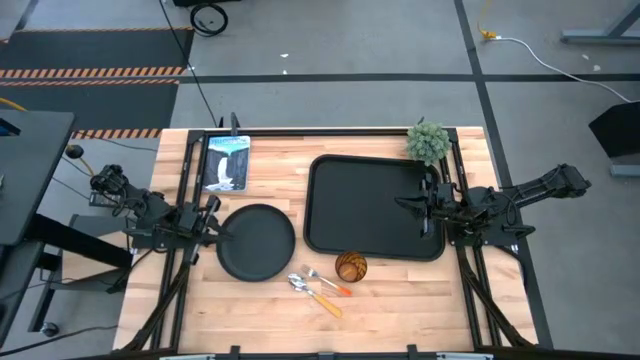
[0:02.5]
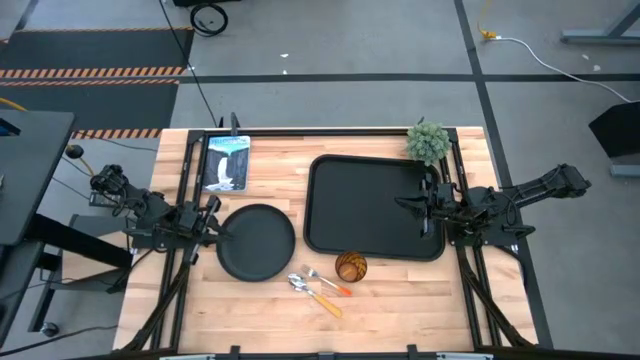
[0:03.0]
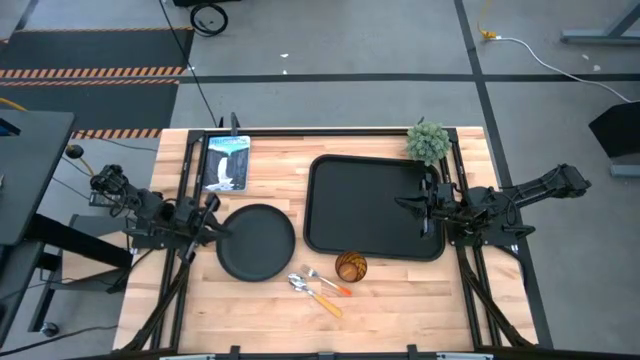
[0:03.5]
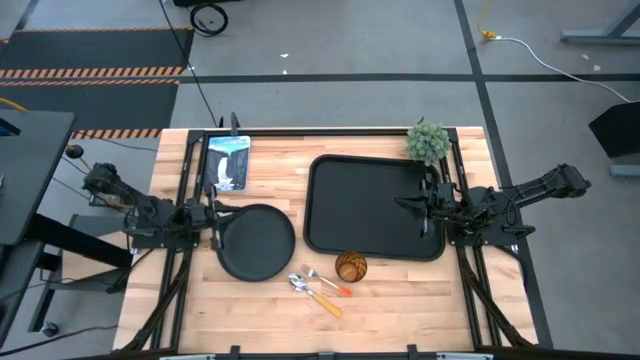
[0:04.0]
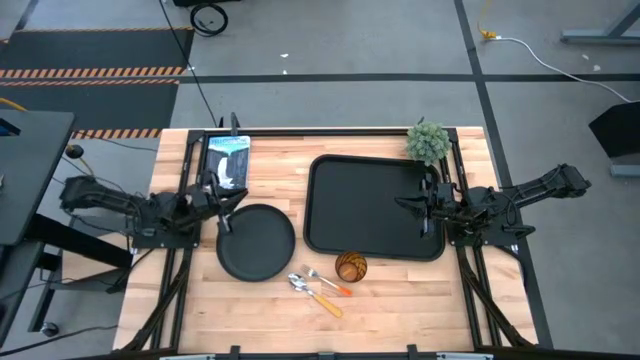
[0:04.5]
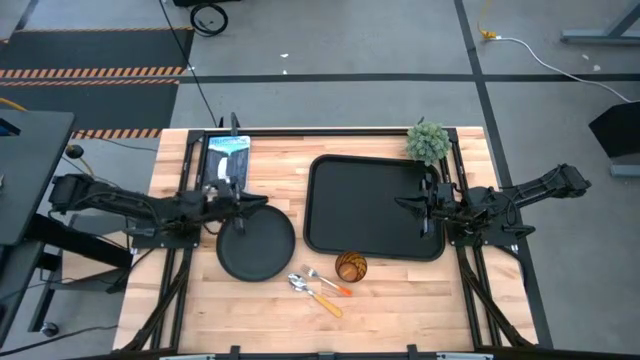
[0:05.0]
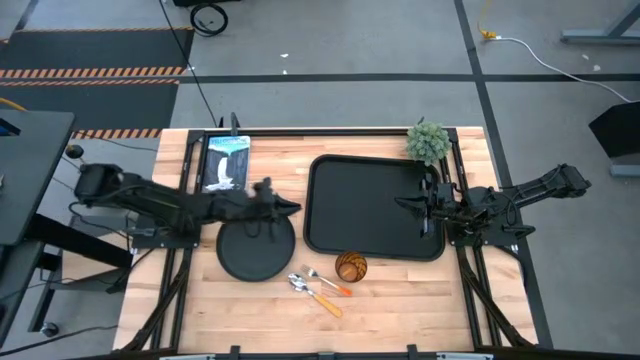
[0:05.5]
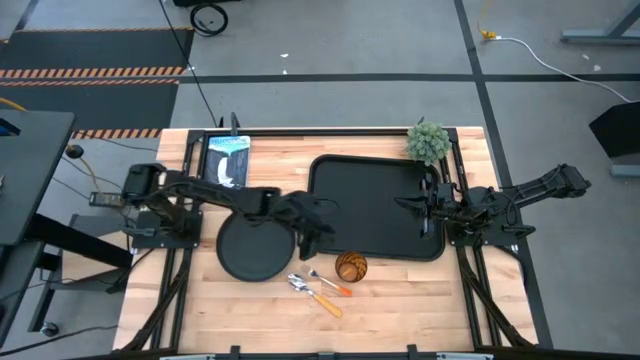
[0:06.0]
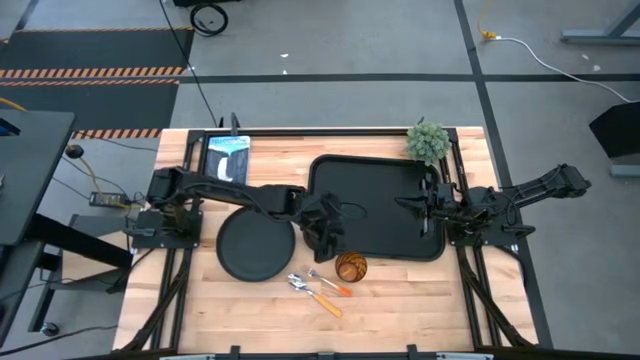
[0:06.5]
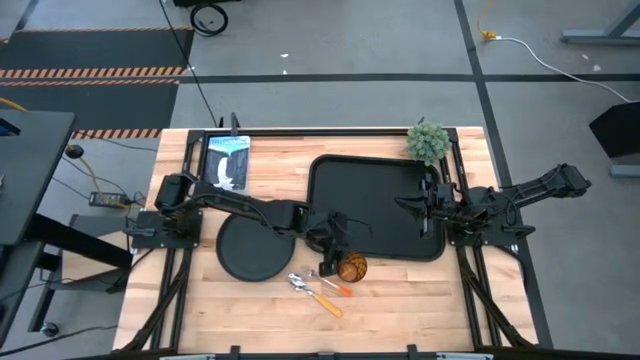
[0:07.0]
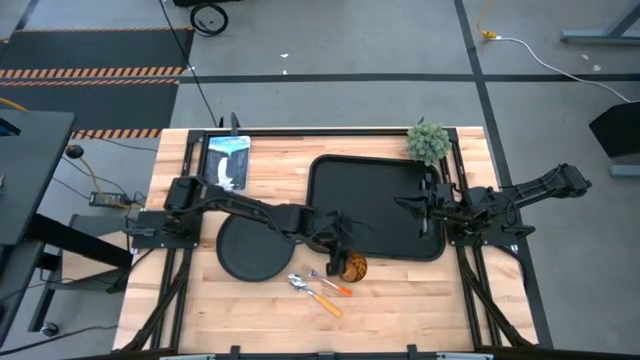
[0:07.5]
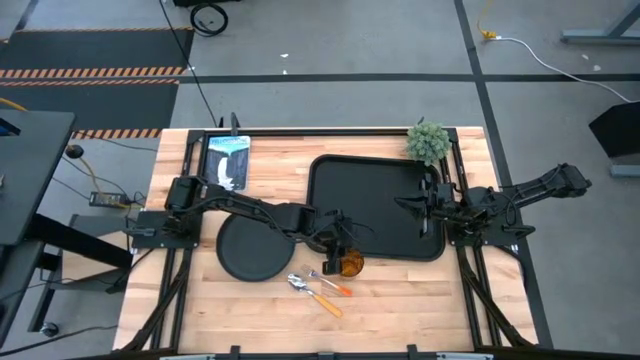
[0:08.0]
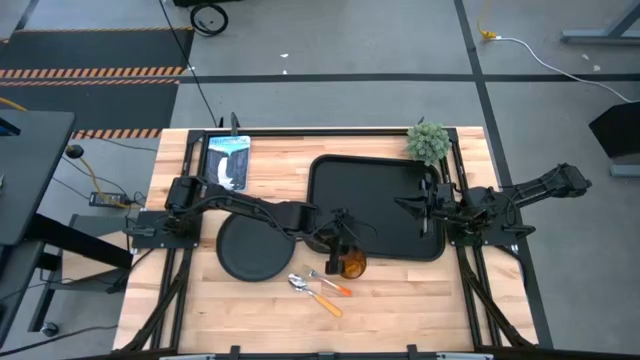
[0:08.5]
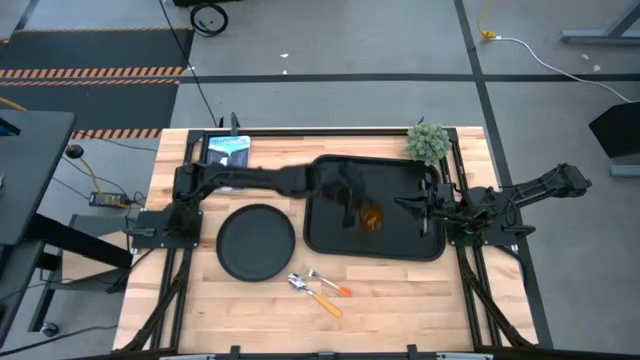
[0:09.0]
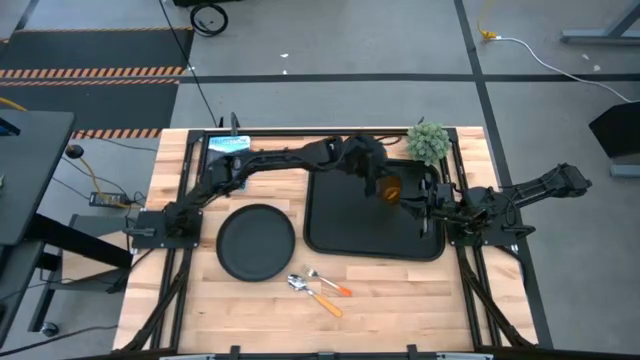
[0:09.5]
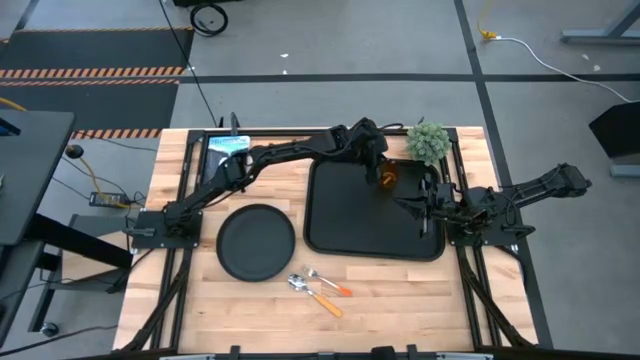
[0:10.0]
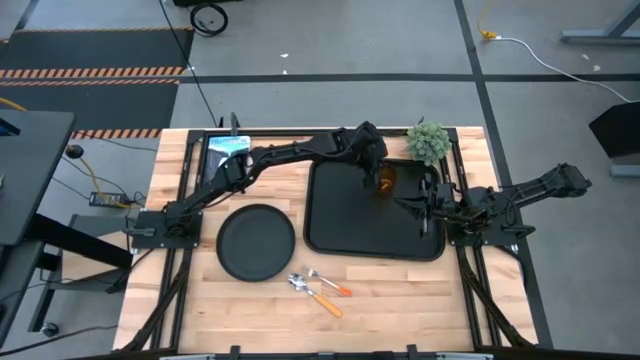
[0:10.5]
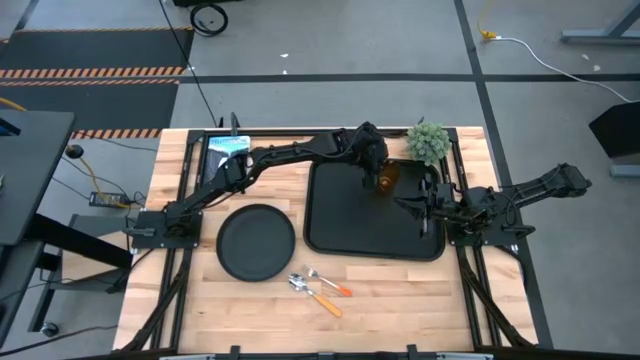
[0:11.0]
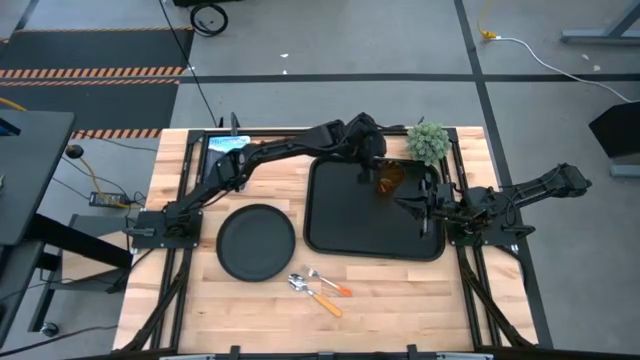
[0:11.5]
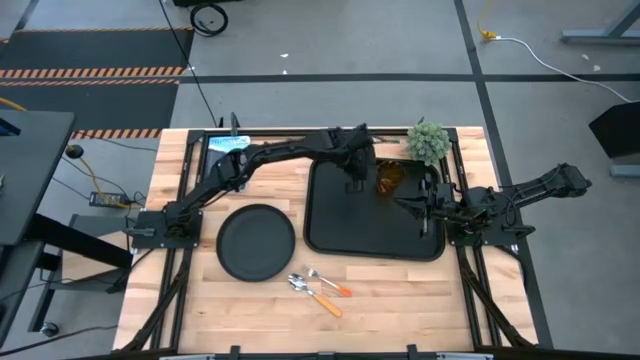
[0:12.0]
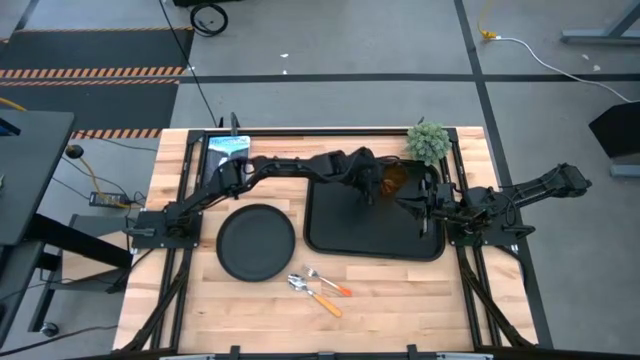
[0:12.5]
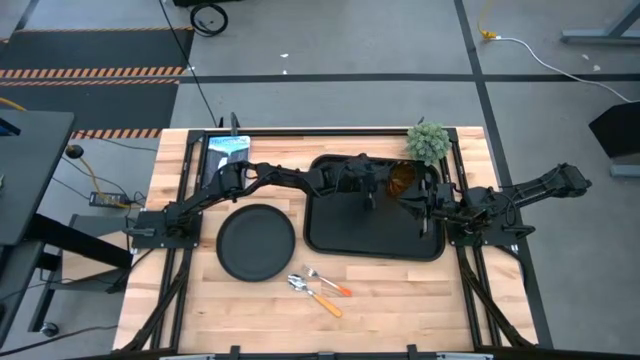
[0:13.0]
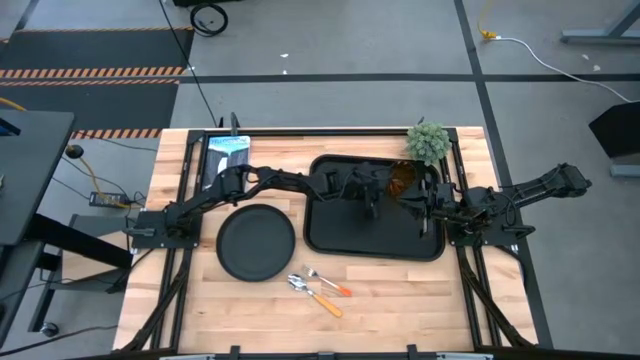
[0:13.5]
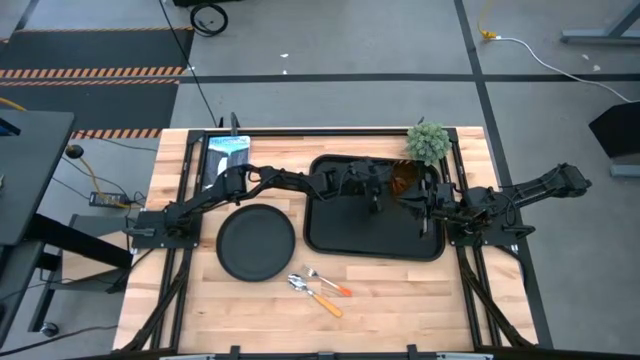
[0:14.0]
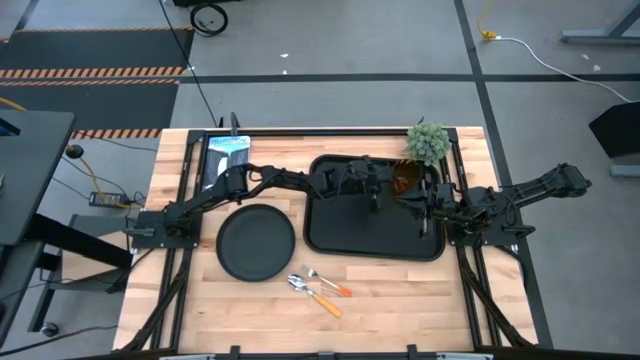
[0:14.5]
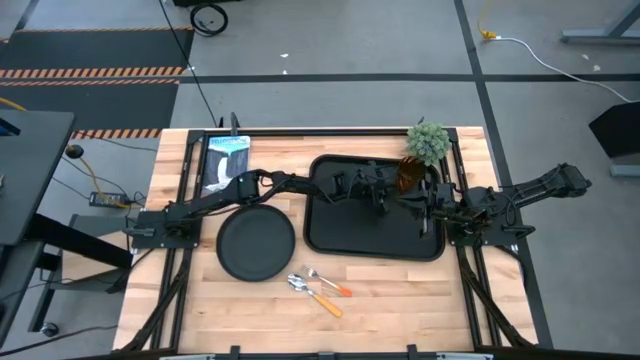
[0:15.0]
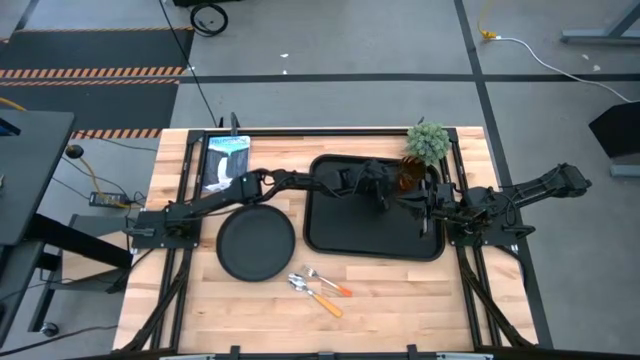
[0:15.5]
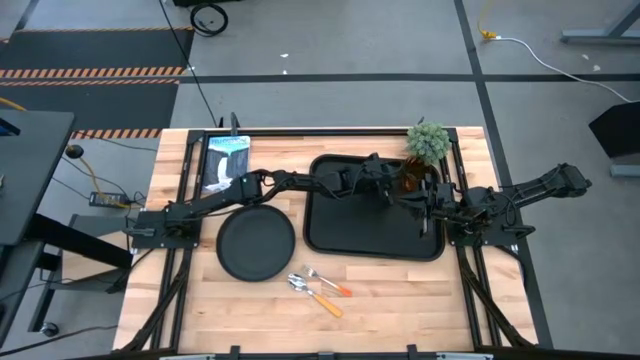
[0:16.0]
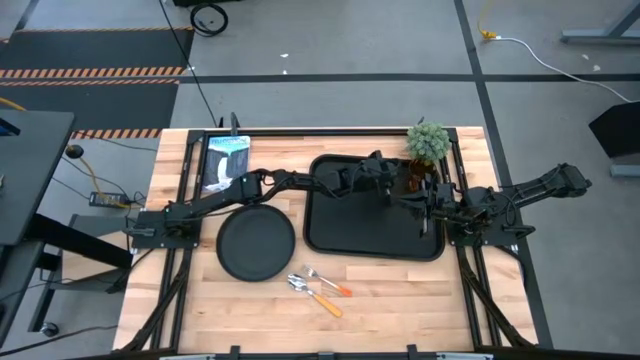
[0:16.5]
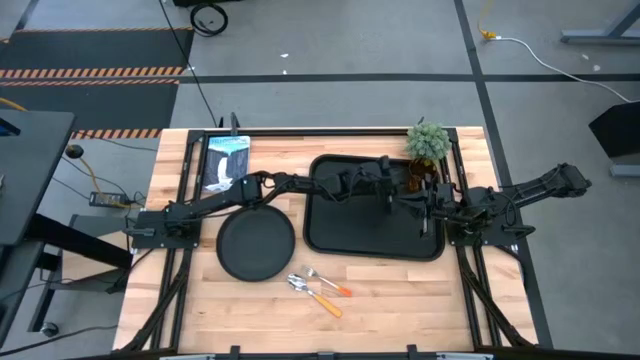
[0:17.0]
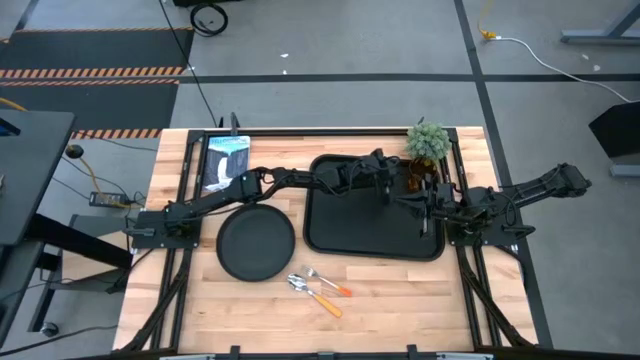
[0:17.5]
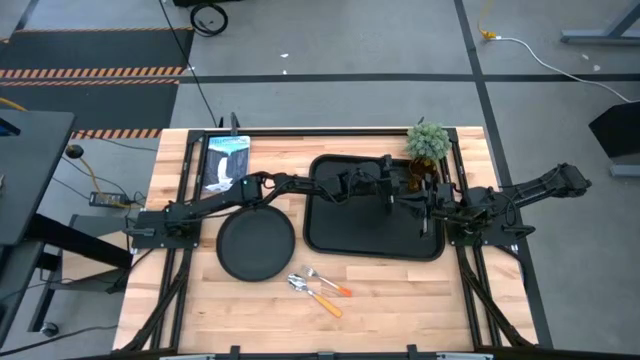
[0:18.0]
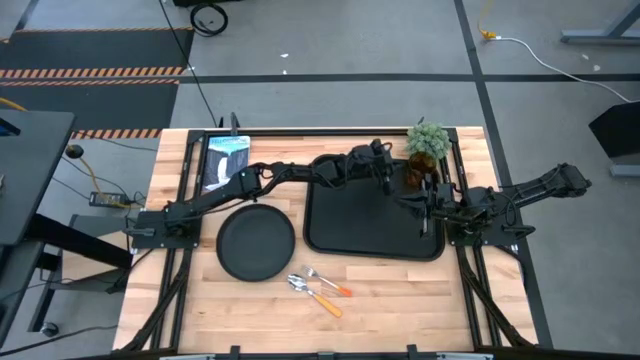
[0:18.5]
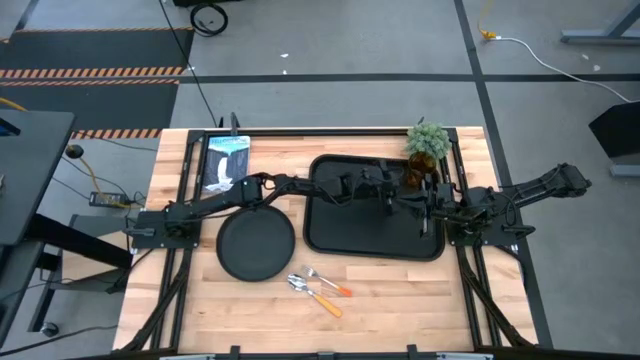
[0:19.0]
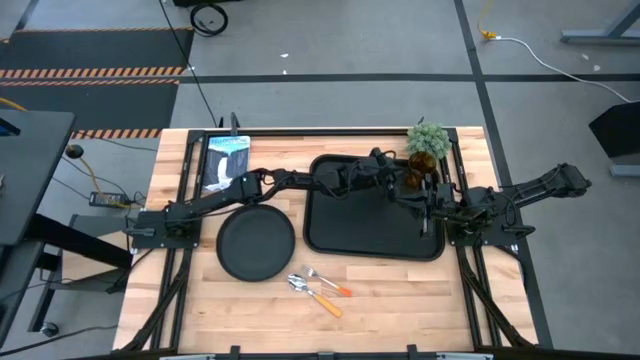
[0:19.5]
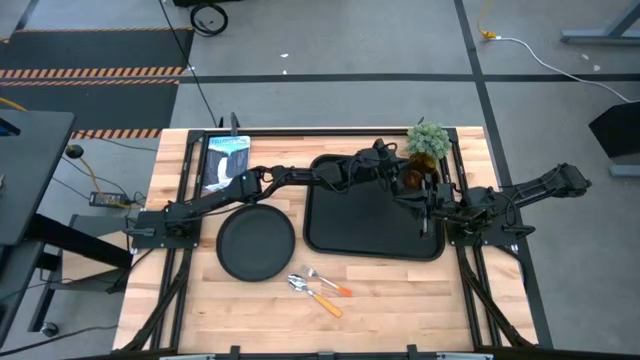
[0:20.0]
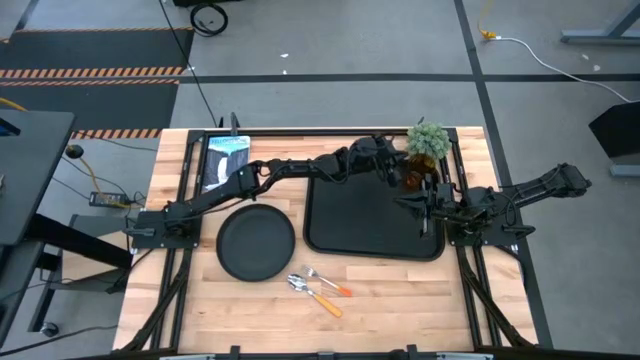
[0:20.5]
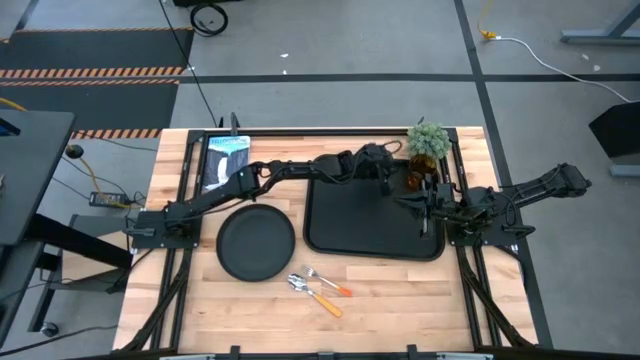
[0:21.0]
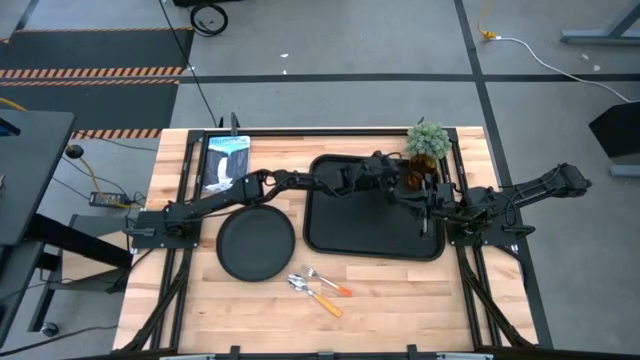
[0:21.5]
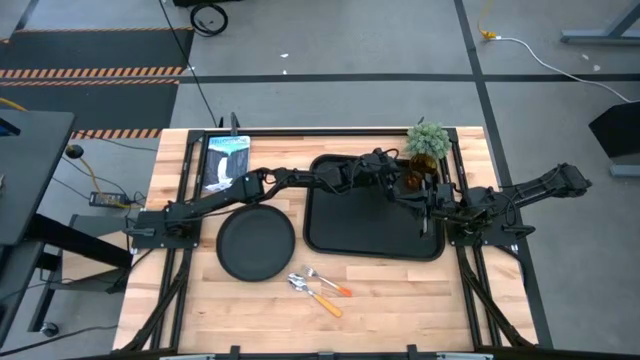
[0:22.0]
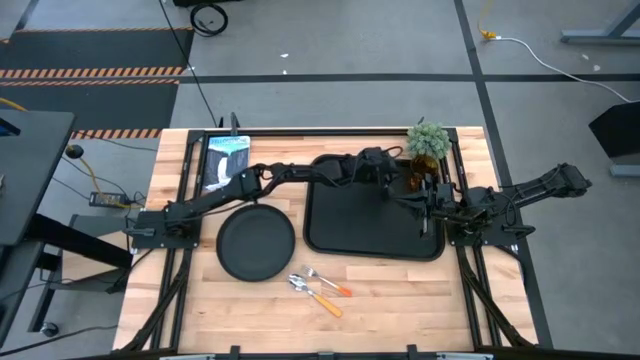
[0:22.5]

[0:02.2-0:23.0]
Task: Pick and place plate/cup/fork/spoon on tray
Put the brown cup on the black serving tray
